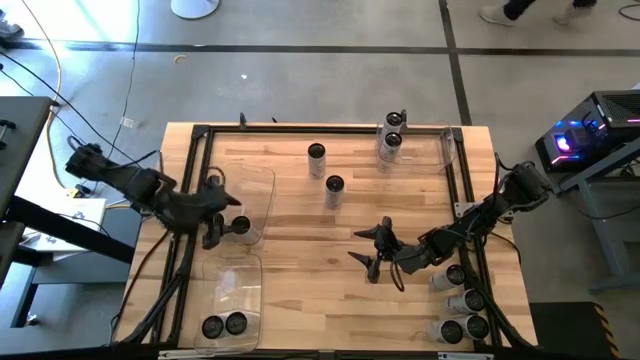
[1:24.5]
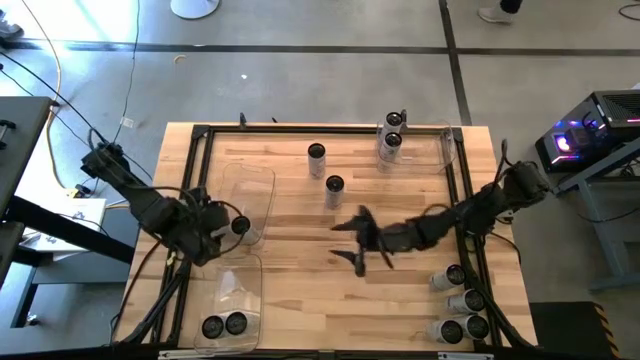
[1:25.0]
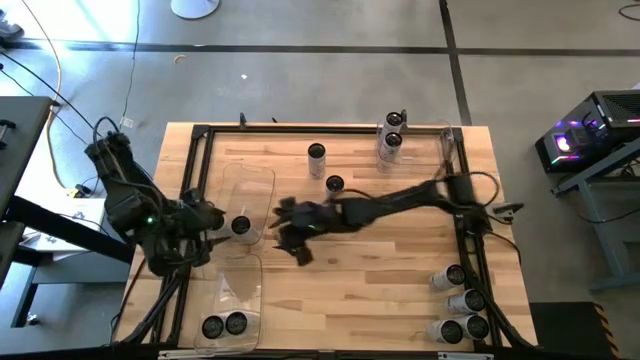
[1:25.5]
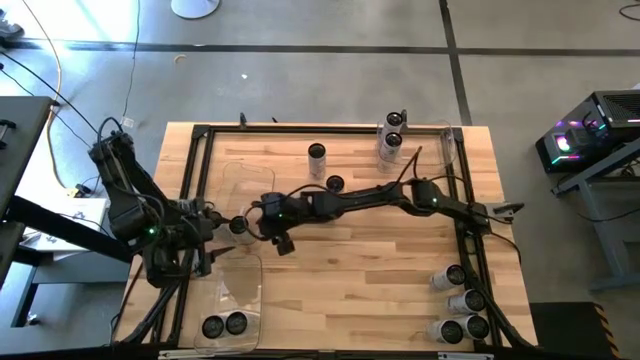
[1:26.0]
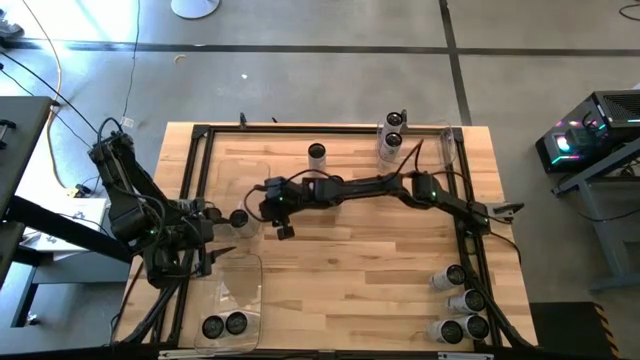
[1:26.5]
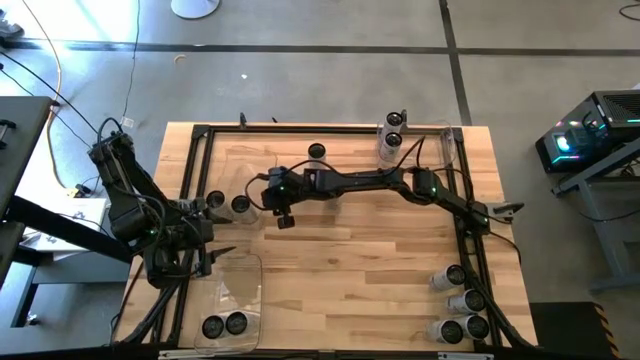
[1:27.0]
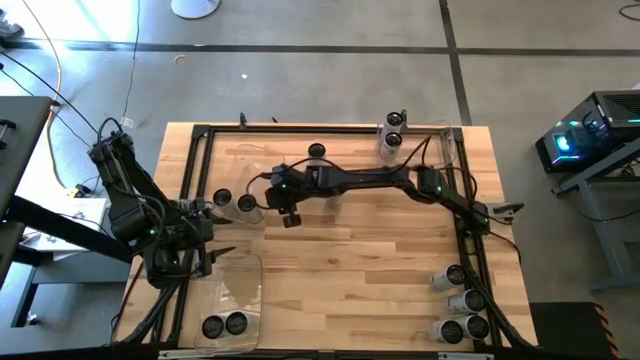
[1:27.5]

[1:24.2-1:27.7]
Task: Sort soda cans
Adjust the top left transparent bin

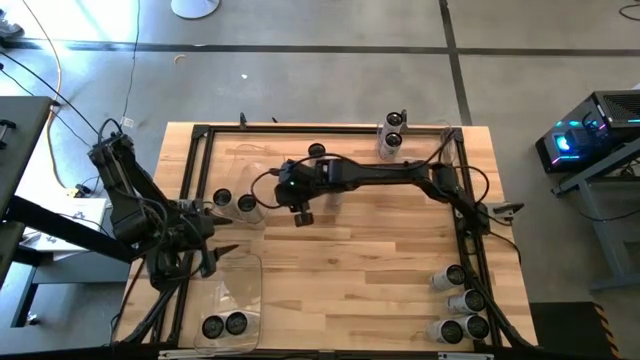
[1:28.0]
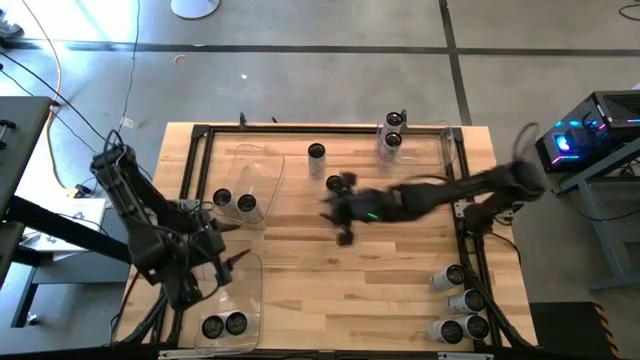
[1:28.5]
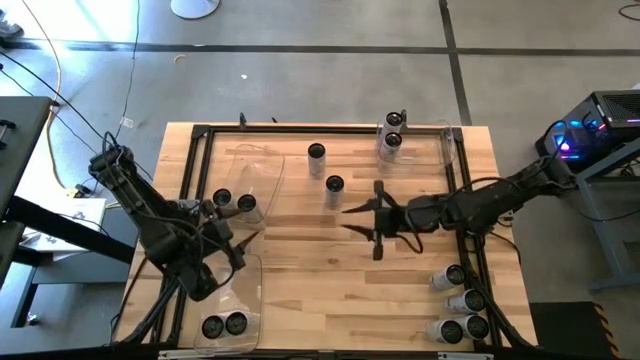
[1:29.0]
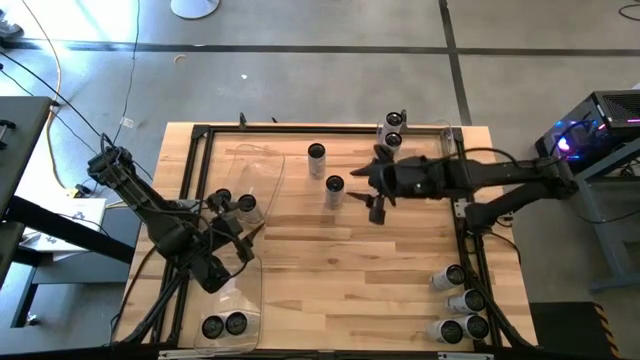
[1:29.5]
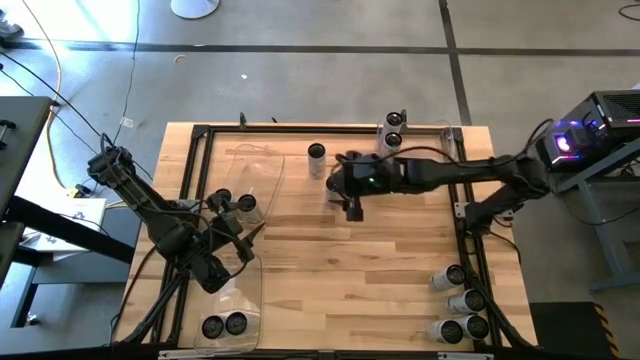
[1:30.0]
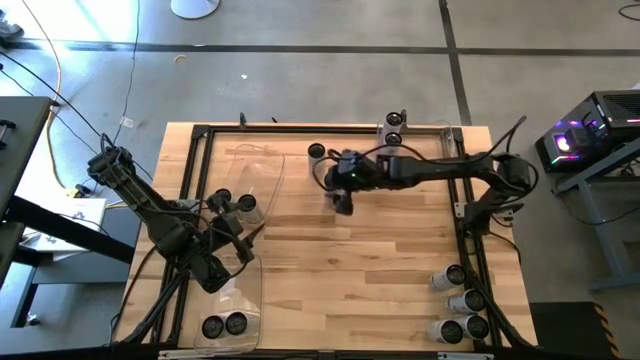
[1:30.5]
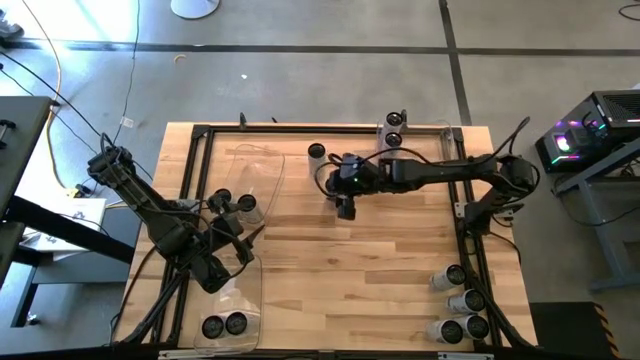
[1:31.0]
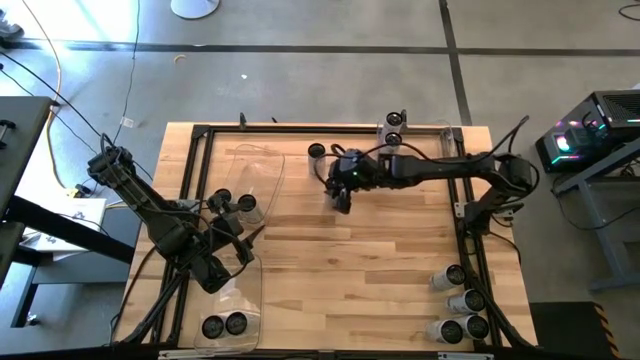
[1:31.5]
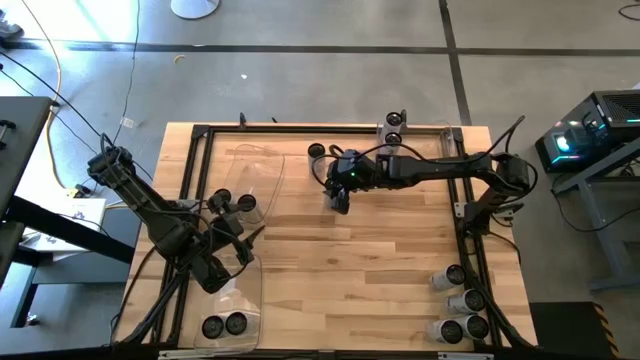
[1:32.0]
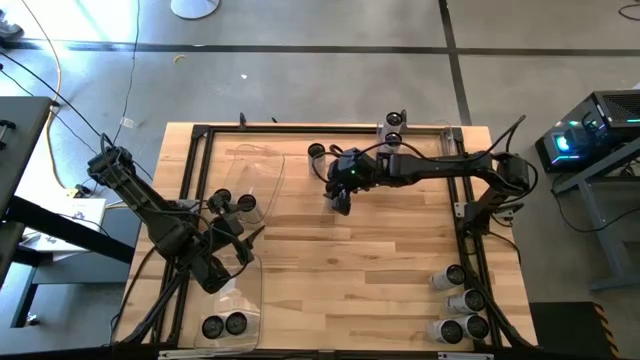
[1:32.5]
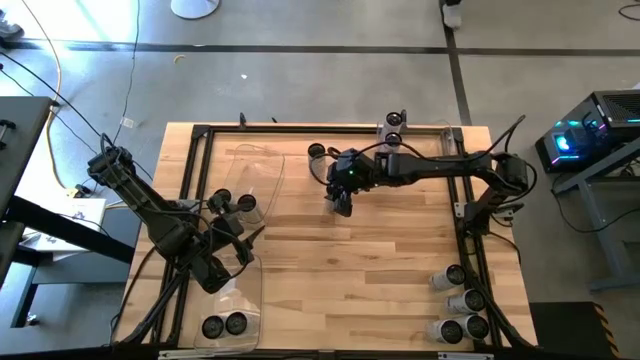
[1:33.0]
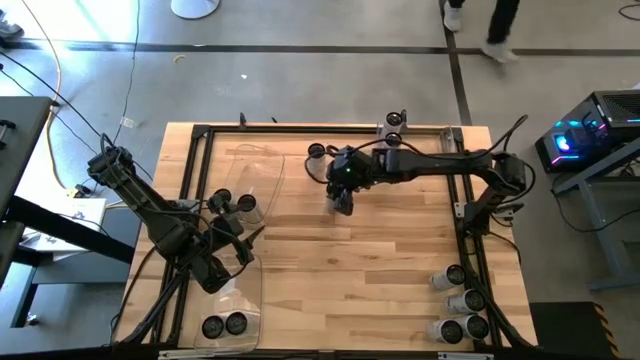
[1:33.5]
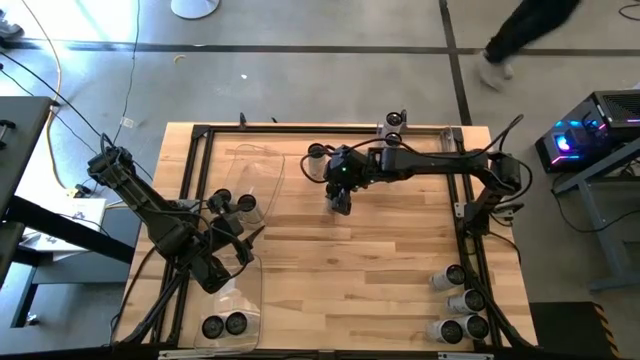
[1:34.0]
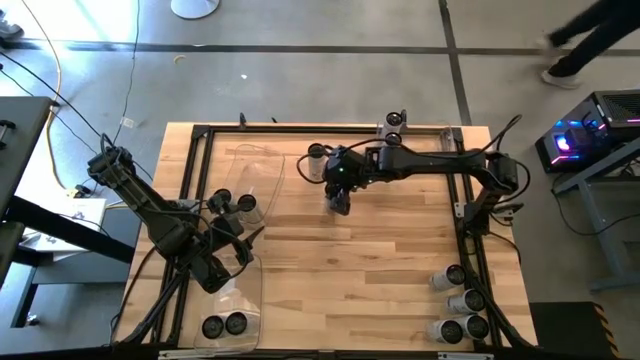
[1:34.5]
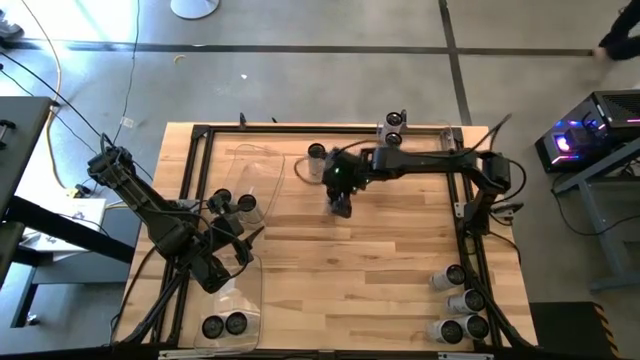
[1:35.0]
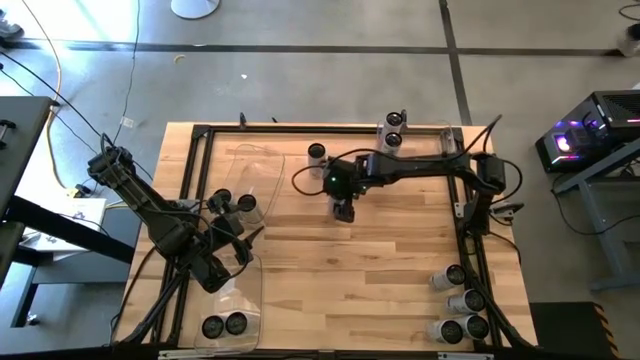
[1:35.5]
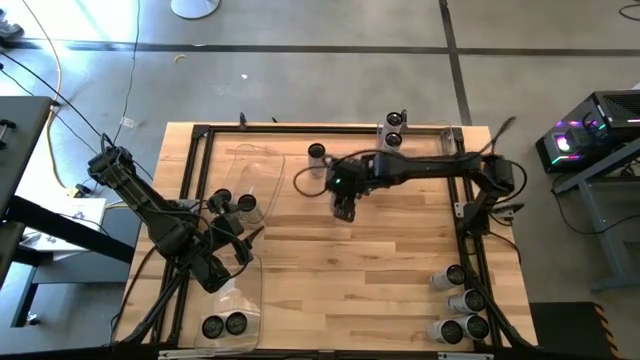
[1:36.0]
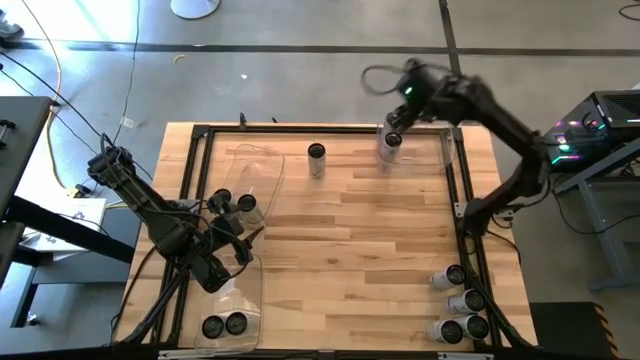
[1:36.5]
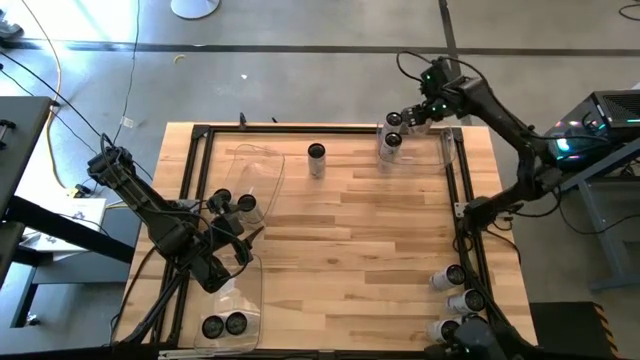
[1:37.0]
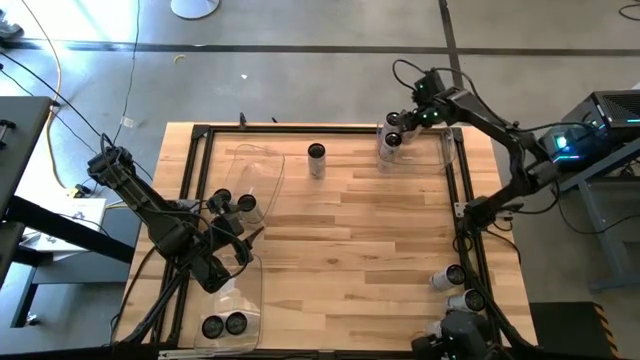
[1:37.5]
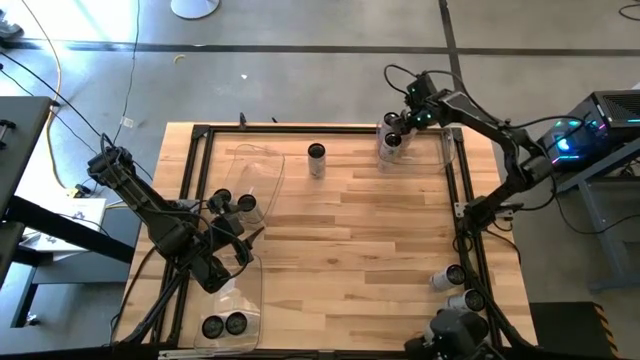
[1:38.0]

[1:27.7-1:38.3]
Put the white pink soda can into the top right transparent bin

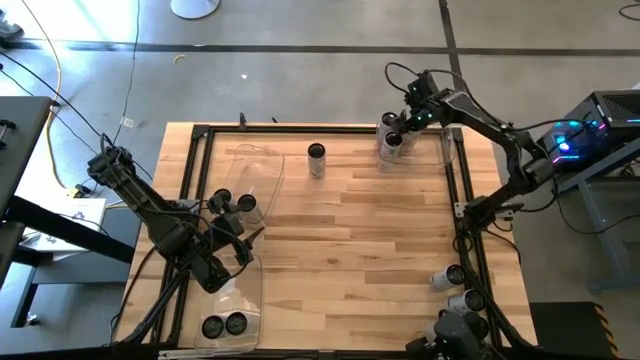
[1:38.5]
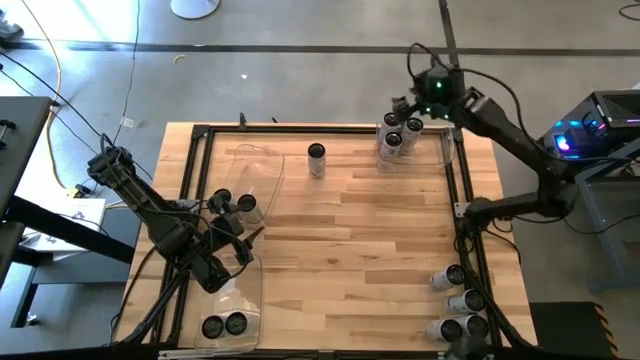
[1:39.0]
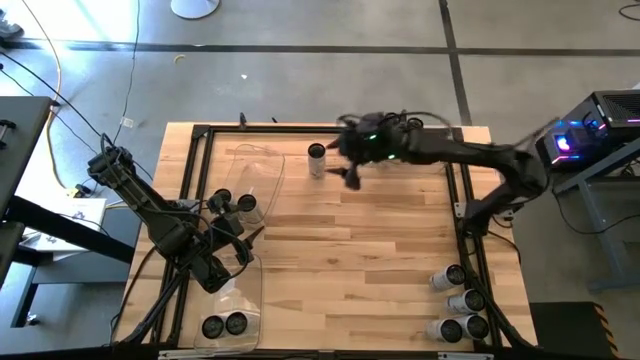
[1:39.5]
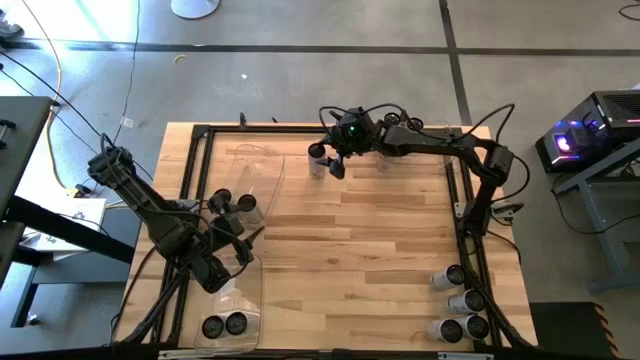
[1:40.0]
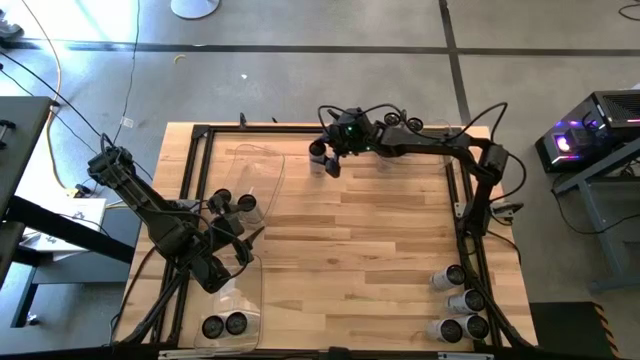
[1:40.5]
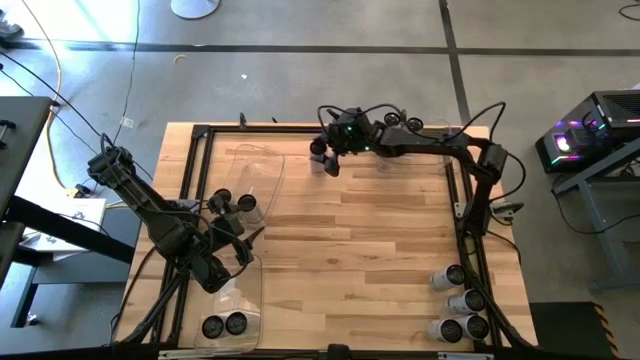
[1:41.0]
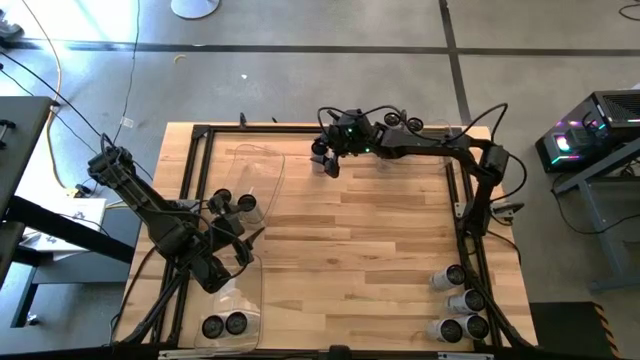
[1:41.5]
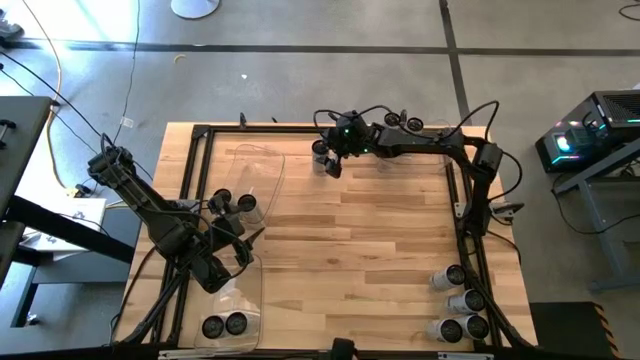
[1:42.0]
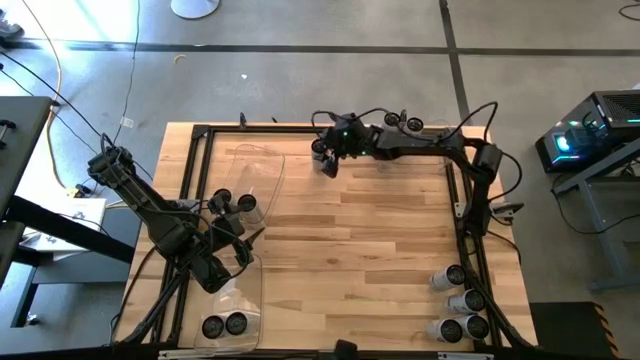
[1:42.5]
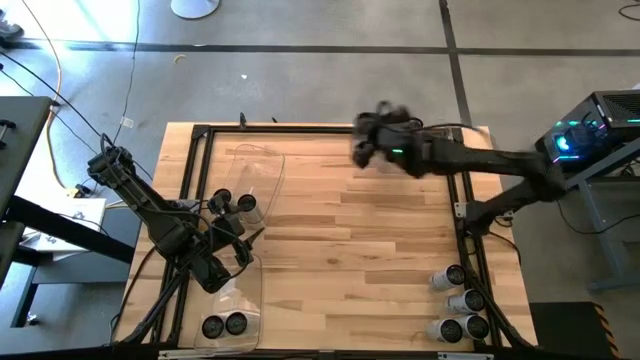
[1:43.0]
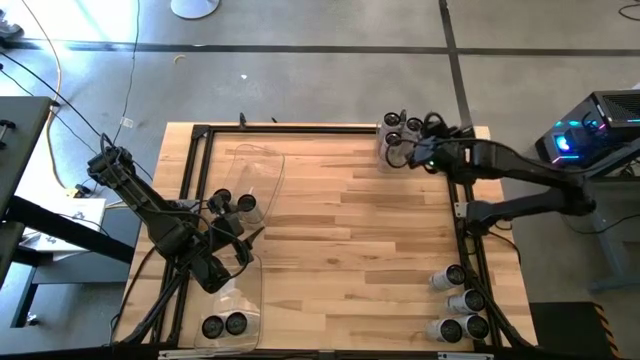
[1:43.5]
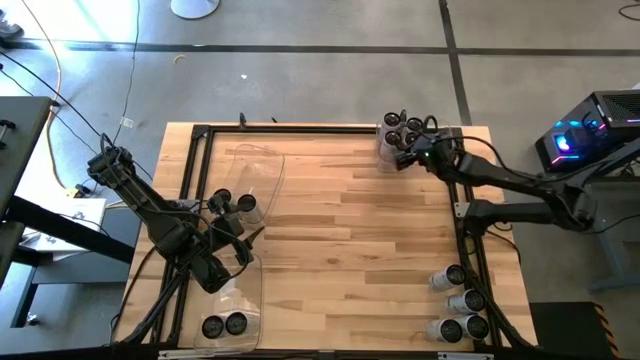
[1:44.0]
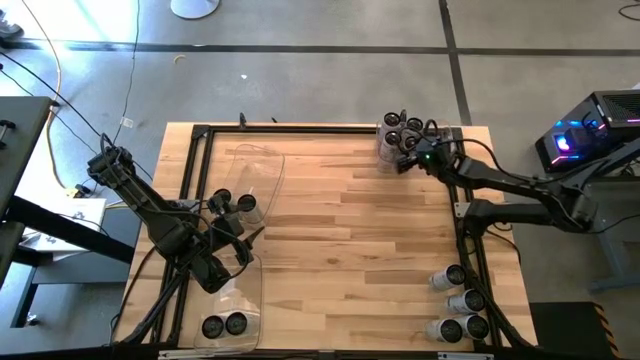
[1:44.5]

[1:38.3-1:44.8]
Put the white pink soda can into the top right transparent bin

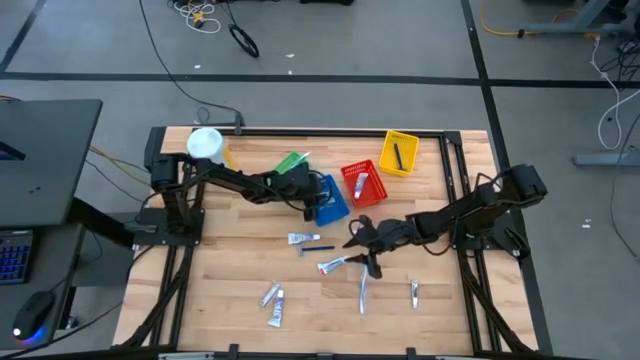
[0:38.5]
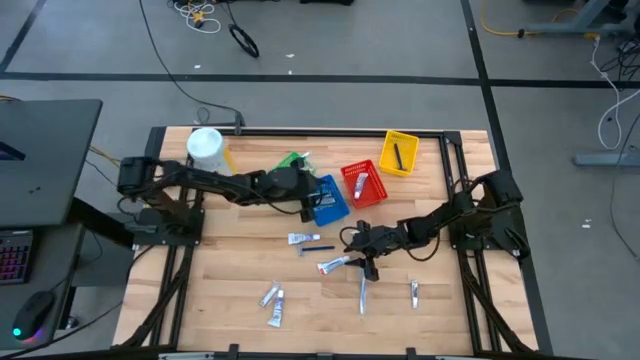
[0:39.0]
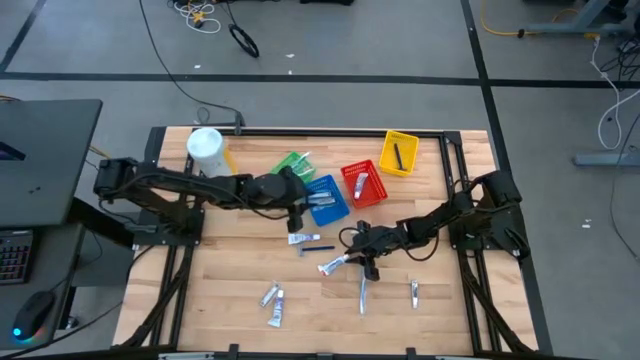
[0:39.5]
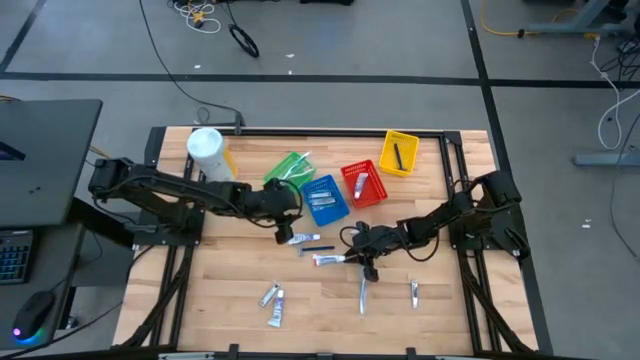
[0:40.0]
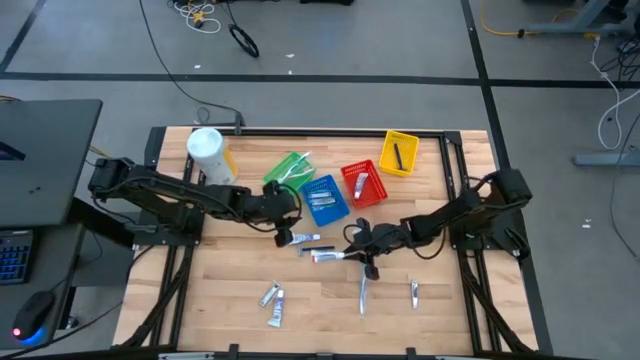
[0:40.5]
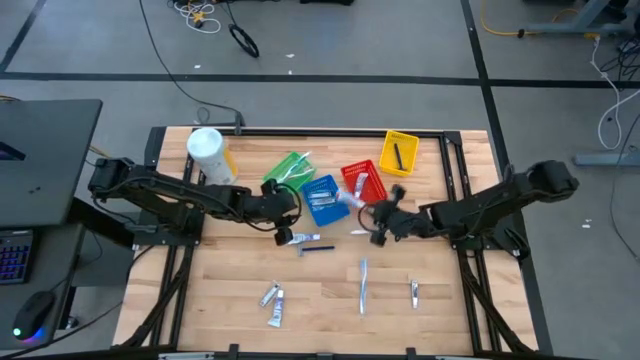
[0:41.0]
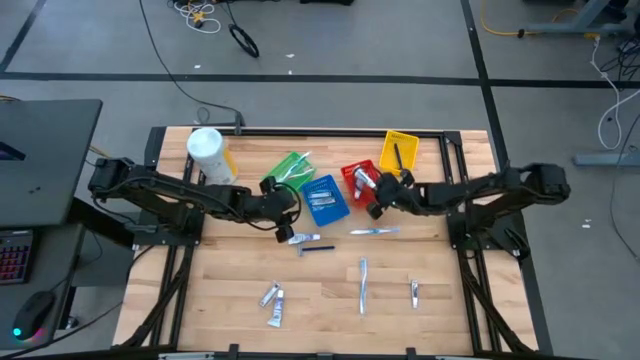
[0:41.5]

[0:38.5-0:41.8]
Task: Pick & Place Travel size toiletries
Put the middle toothpaste into the red bin
